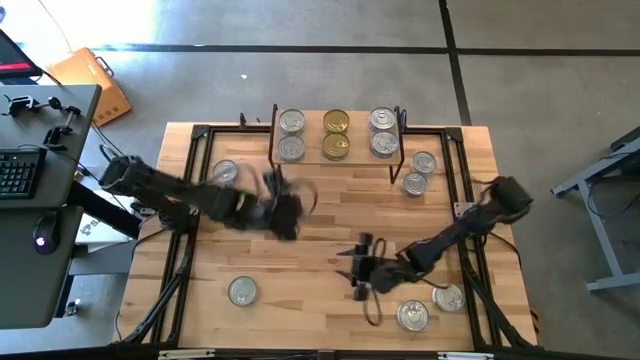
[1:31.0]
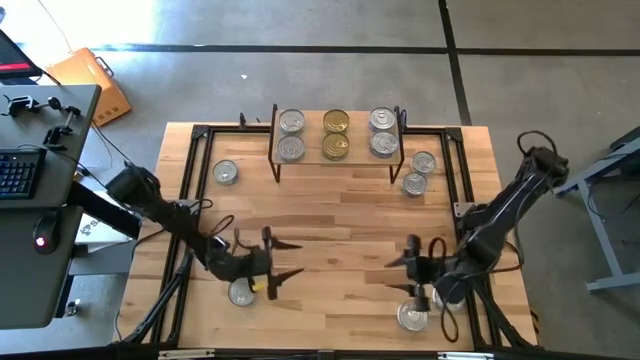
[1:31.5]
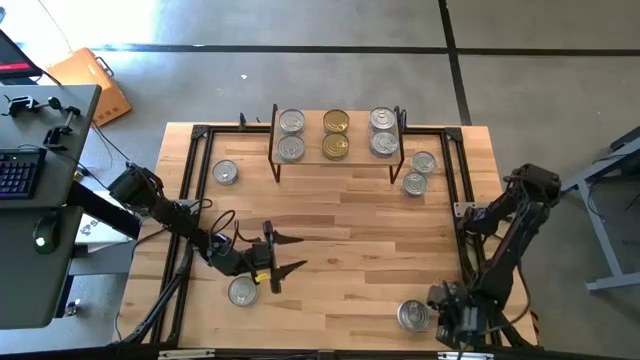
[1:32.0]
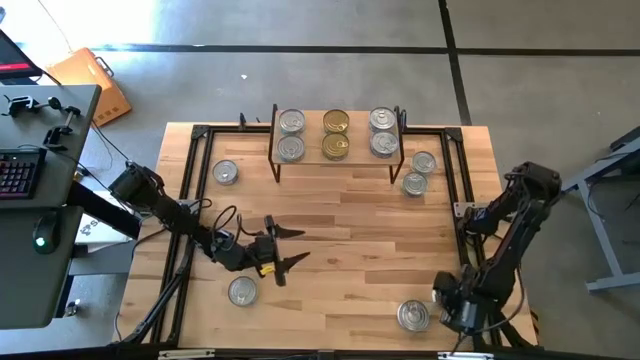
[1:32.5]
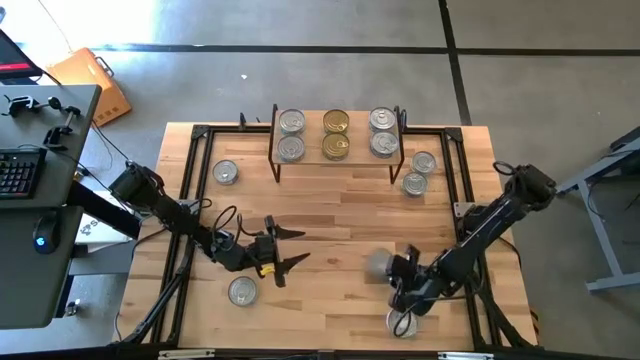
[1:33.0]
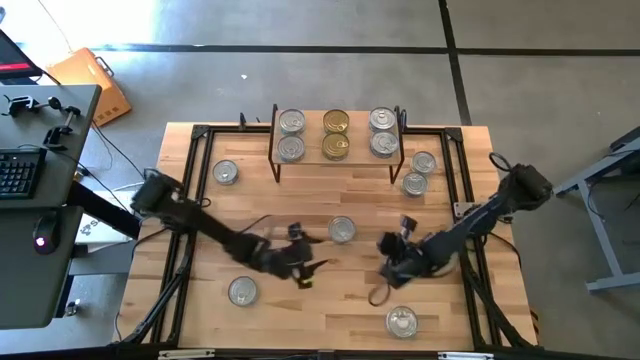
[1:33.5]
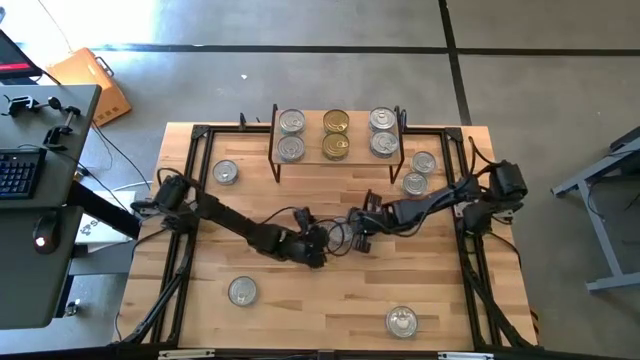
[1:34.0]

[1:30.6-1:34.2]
Task: Stack canned seafood by type on shelf
Move the green tuna can to the center of the table

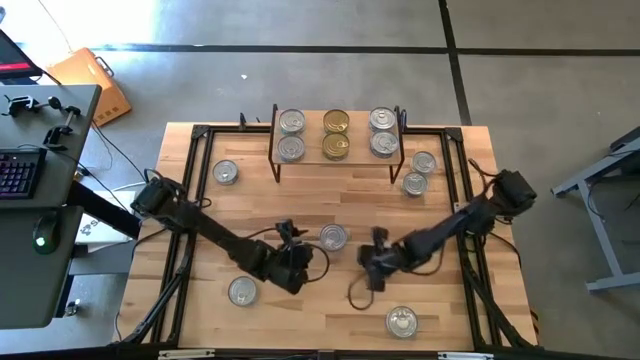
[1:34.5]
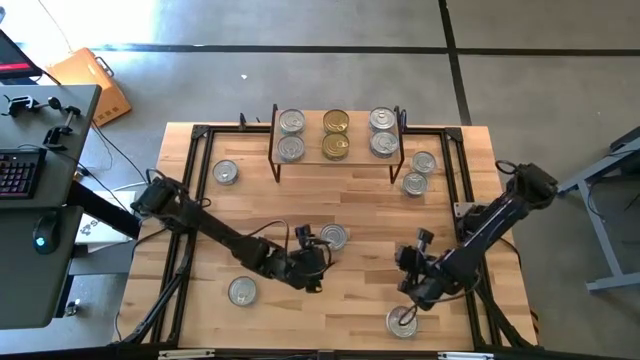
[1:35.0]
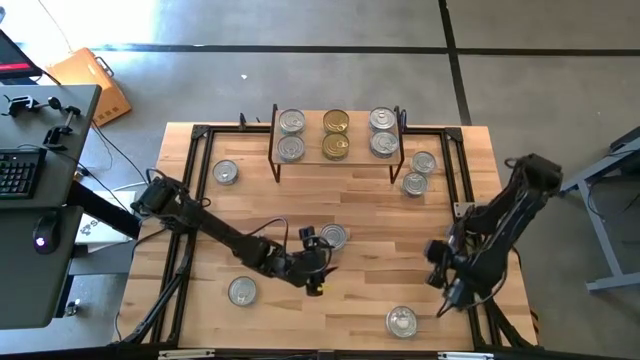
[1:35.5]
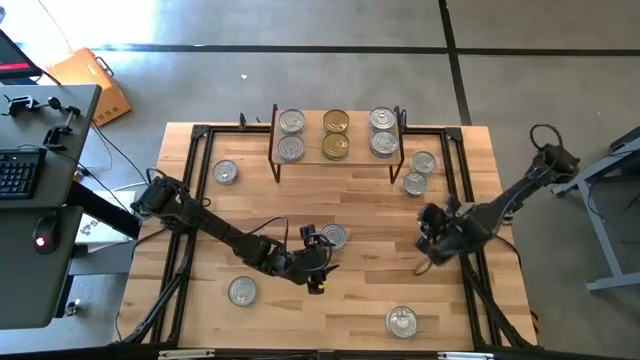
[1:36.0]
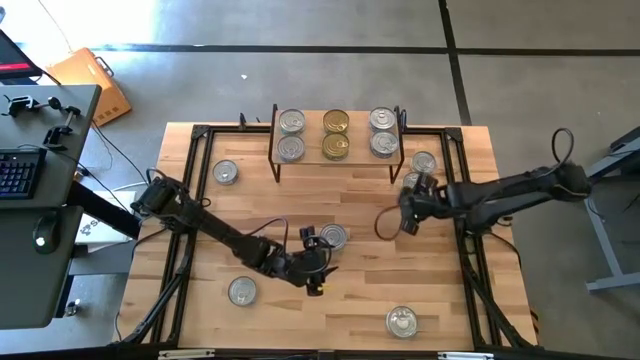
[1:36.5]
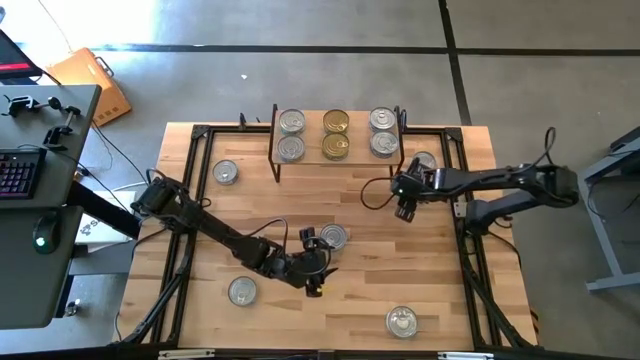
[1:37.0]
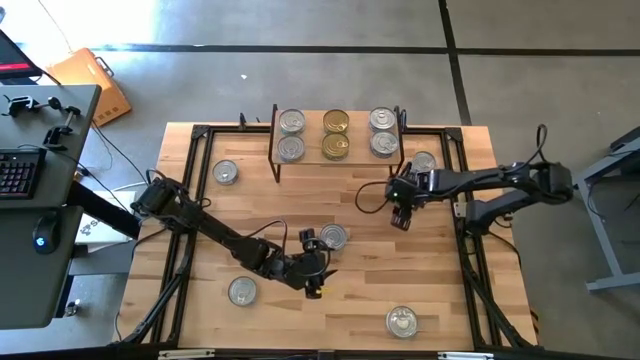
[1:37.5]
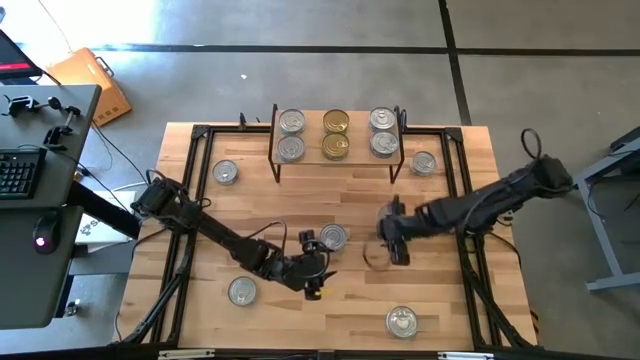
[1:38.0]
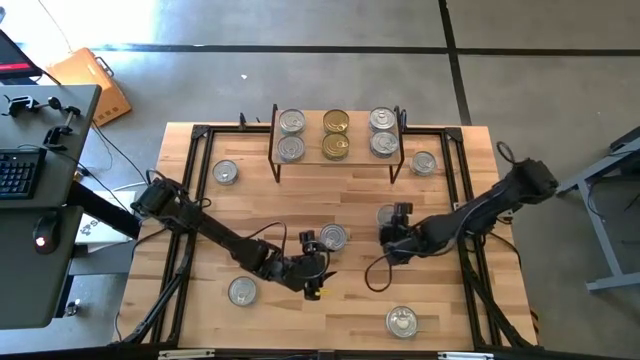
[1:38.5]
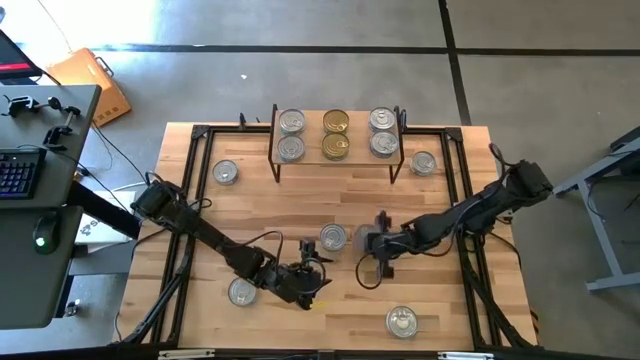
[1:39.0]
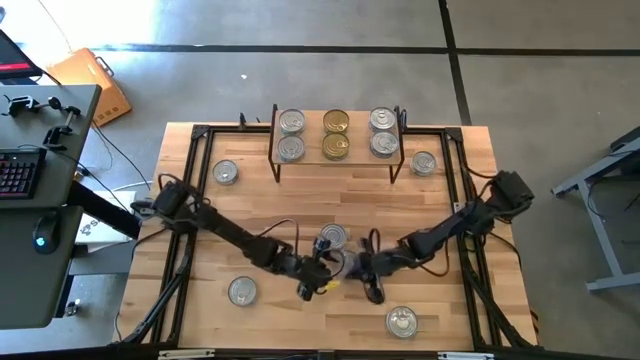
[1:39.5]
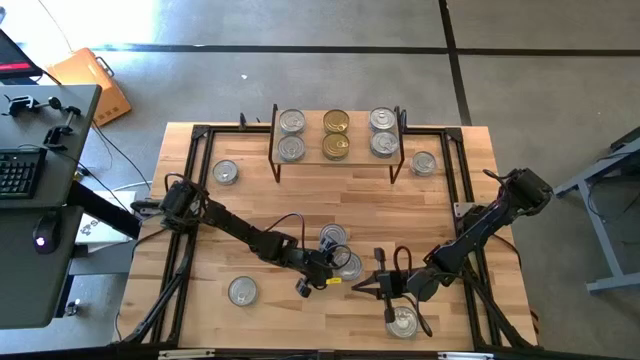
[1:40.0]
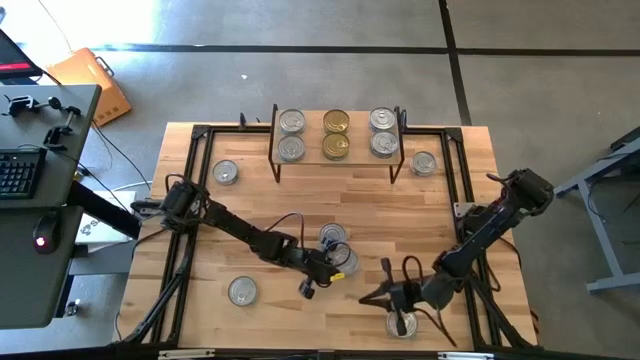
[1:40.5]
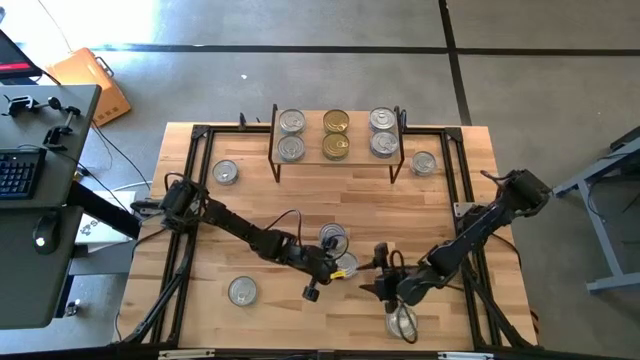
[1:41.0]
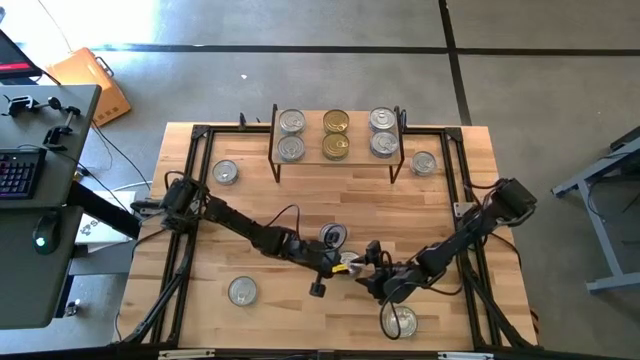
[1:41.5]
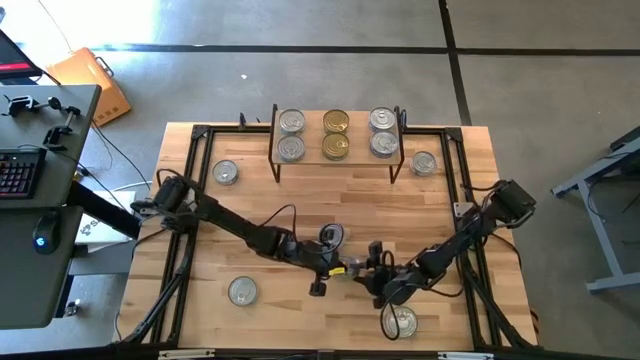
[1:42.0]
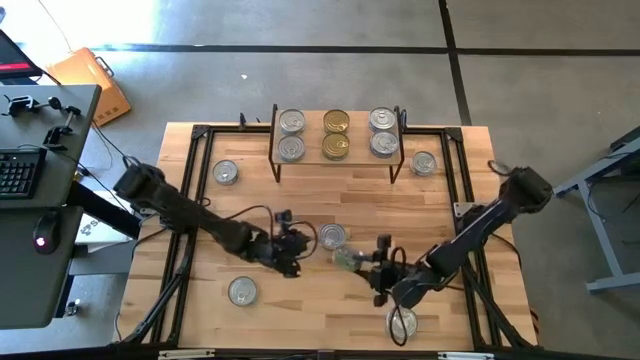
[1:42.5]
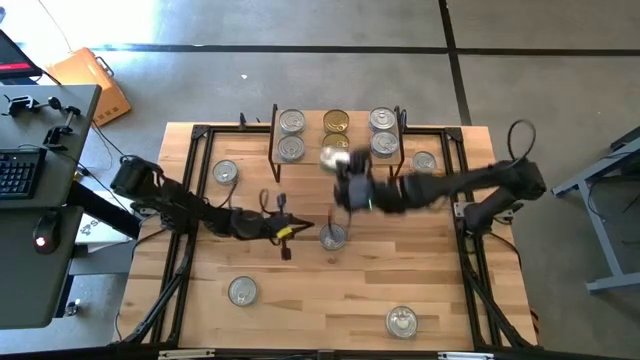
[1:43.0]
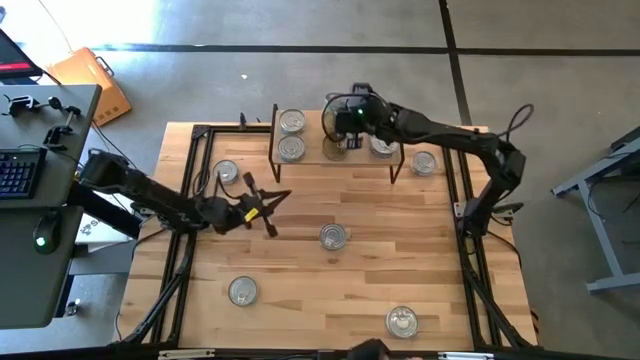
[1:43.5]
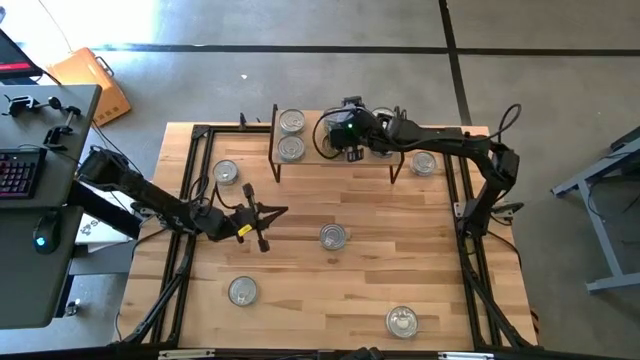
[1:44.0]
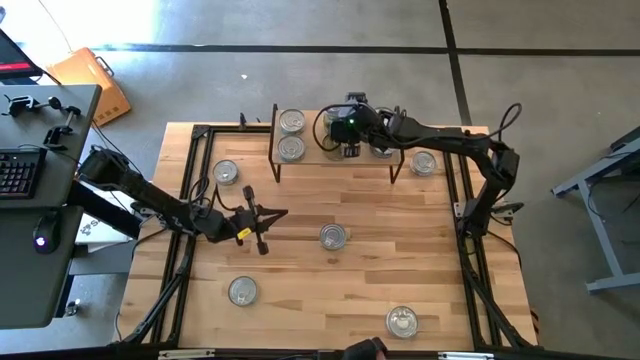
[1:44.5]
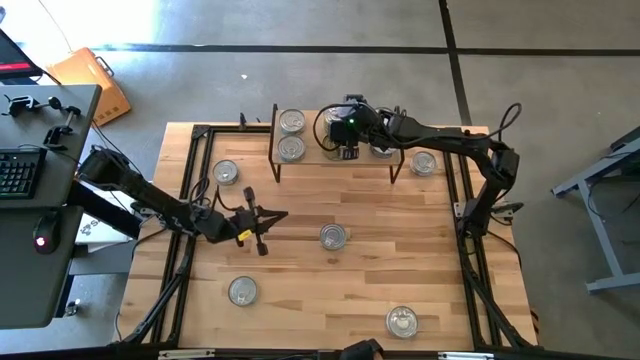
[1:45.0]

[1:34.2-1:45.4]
Stack the green tuna can on top of the other green tuna can on the shelf

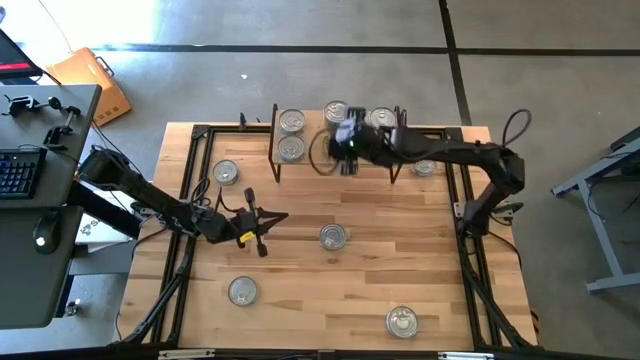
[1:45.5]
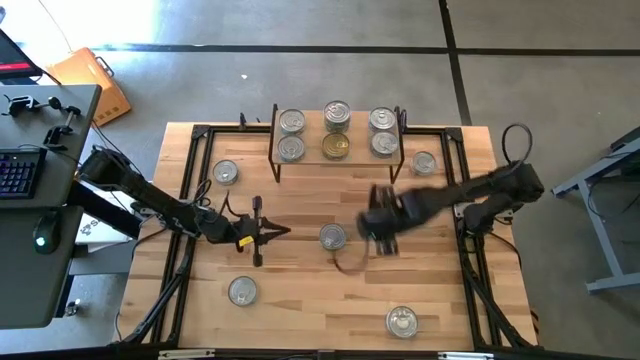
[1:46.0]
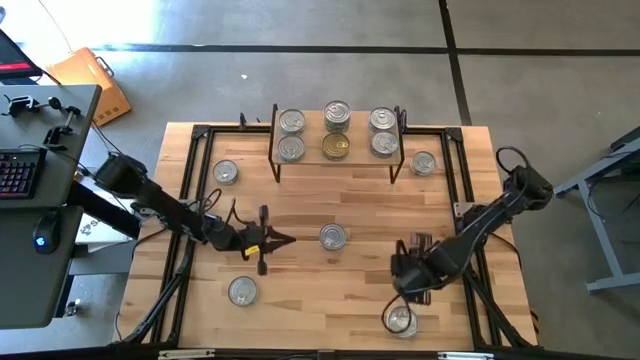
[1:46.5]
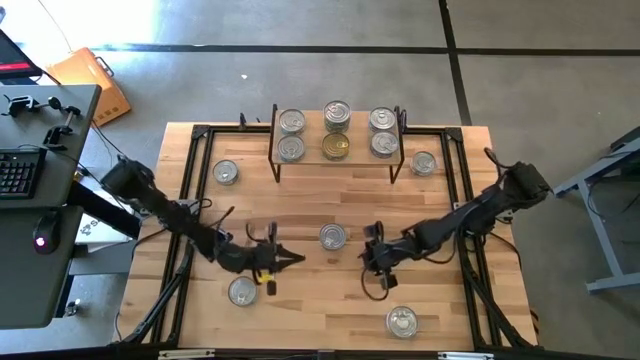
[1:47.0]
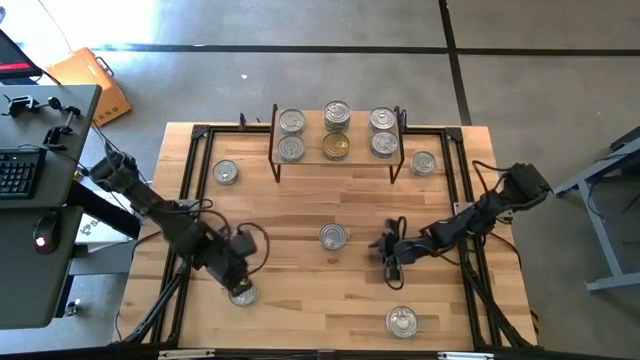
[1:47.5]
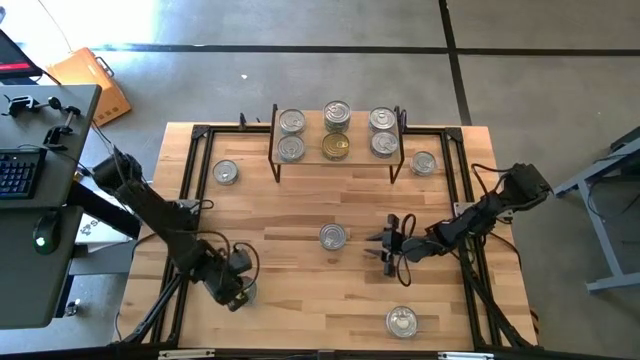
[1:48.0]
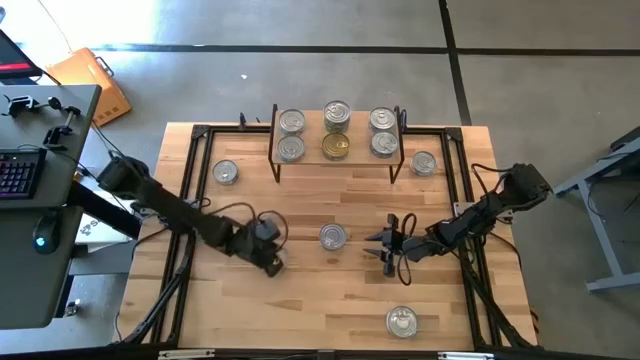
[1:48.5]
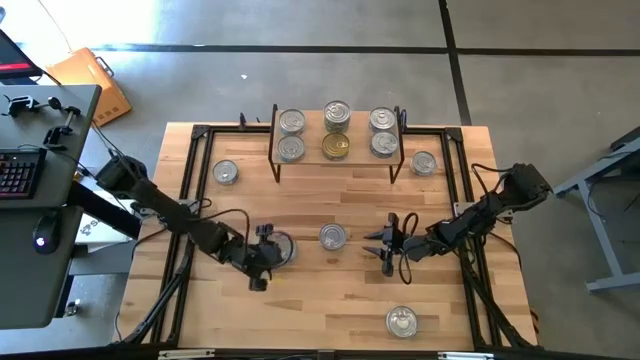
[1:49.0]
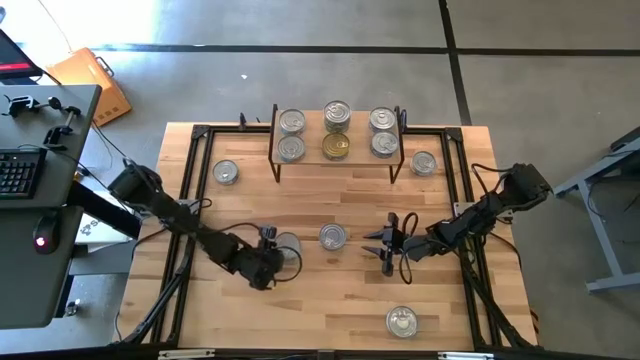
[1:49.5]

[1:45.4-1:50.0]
Stack the blue tuna can on top of the other blue tuna can on the shelf

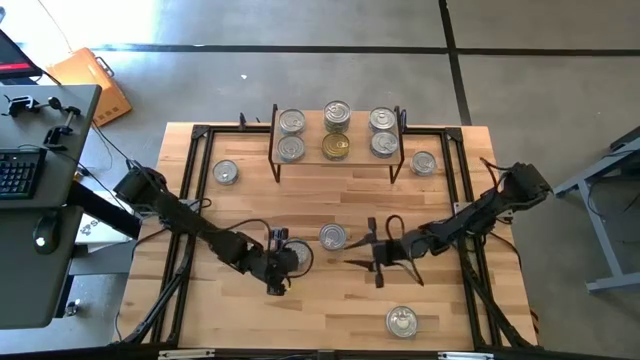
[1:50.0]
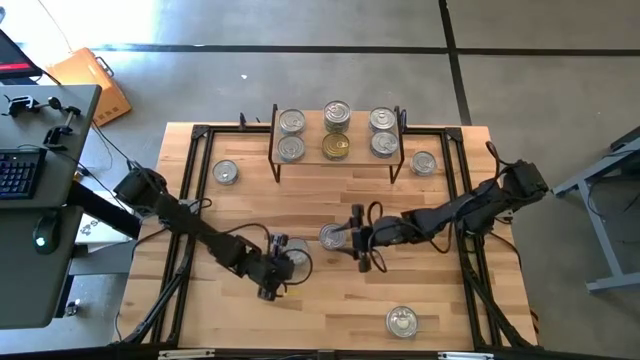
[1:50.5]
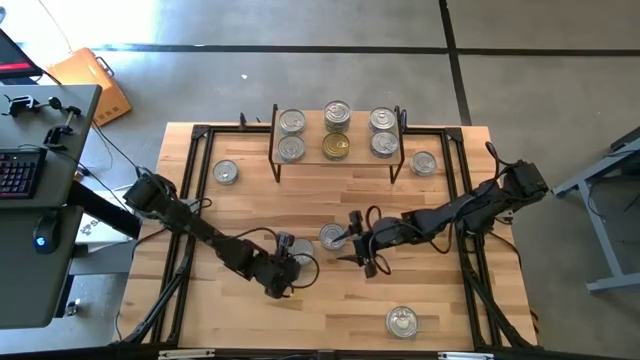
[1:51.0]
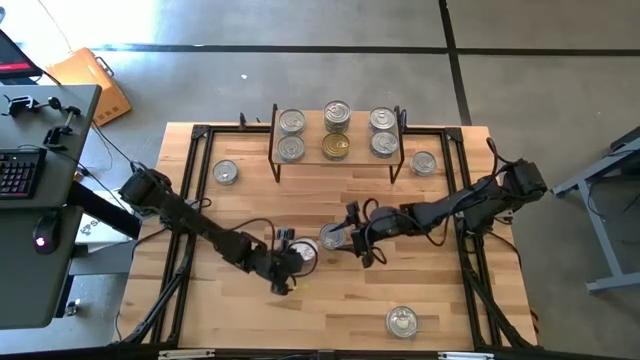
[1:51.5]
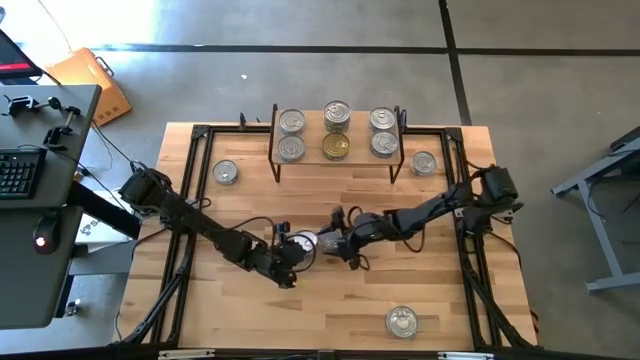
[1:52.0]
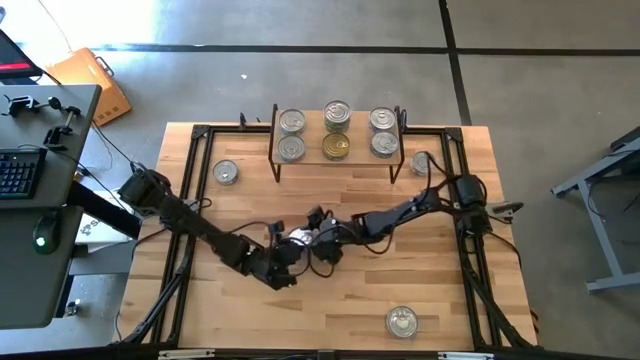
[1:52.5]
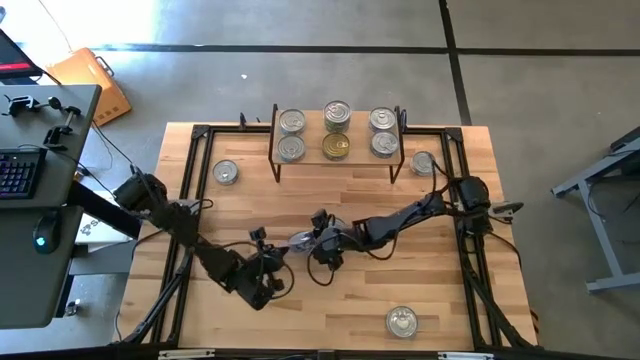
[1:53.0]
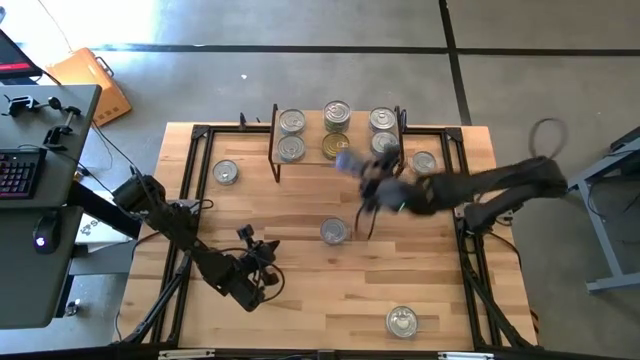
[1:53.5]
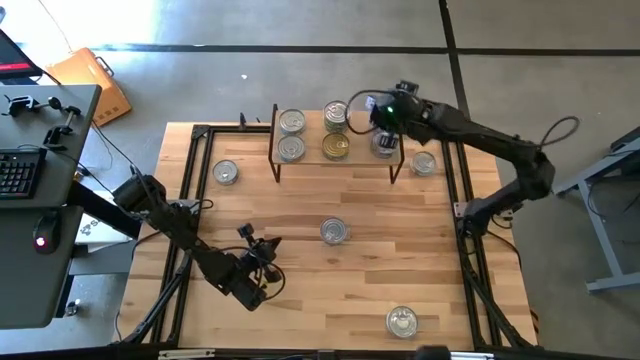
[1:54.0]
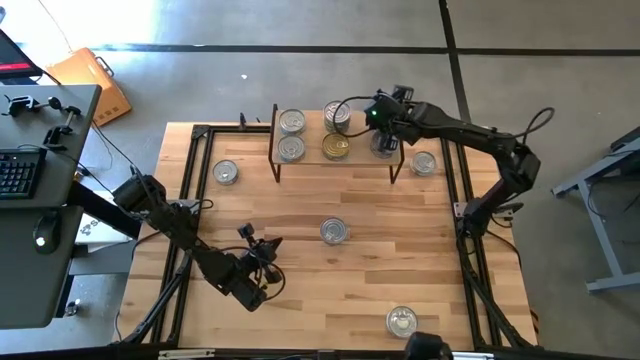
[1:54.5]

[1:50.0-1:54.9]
Stack the blue tuna can on top of the other blue tuna can on the shelf
